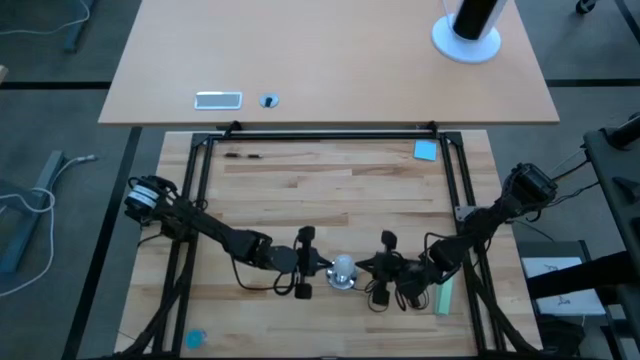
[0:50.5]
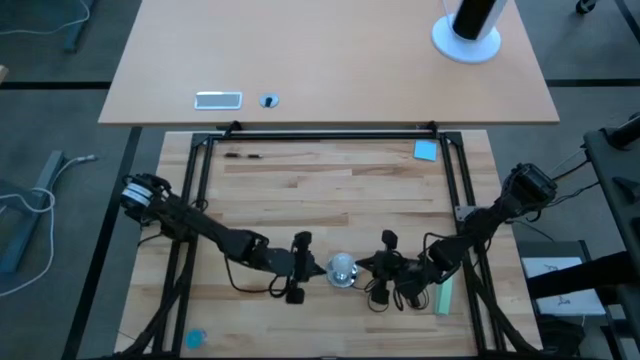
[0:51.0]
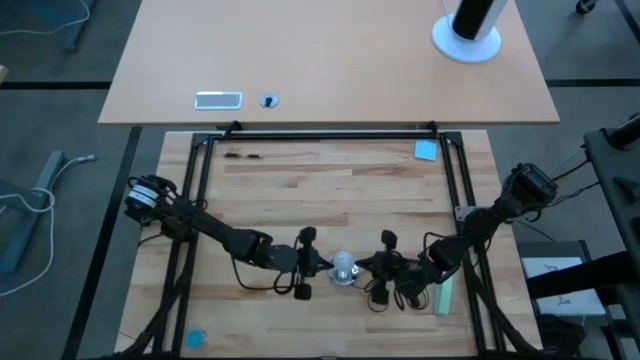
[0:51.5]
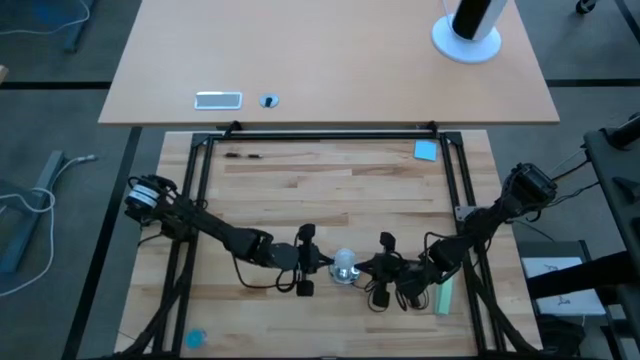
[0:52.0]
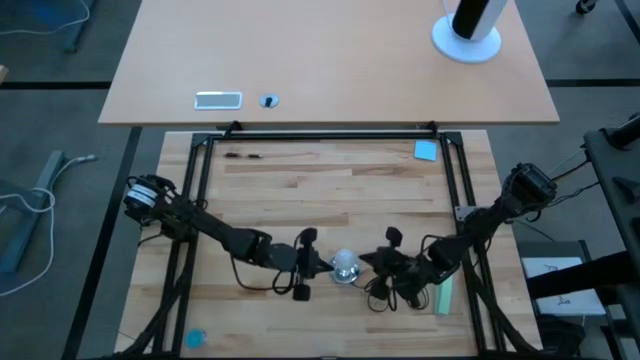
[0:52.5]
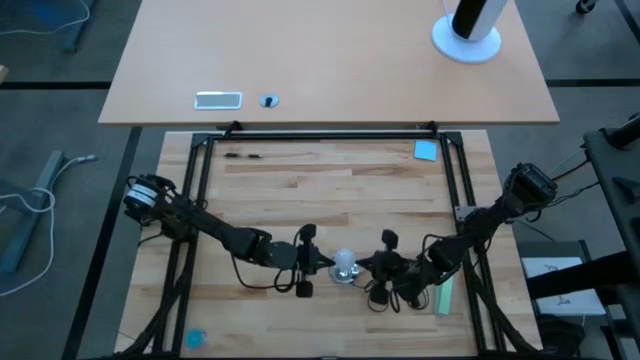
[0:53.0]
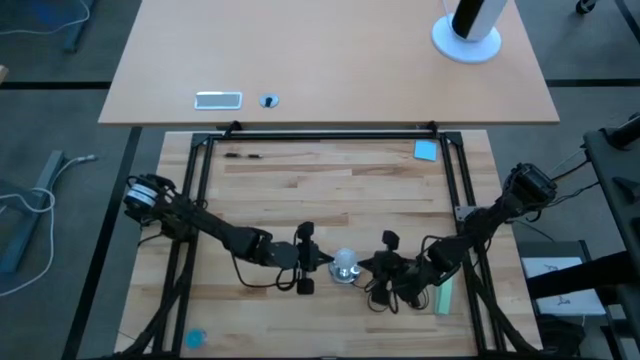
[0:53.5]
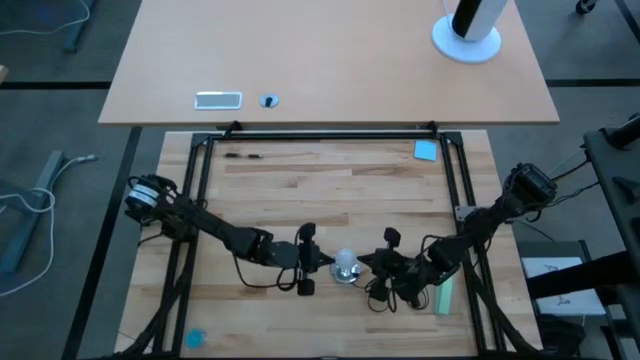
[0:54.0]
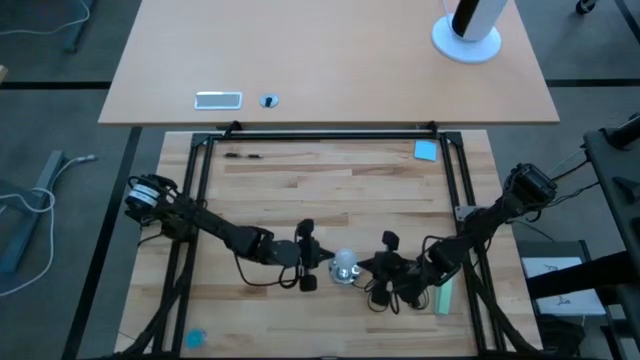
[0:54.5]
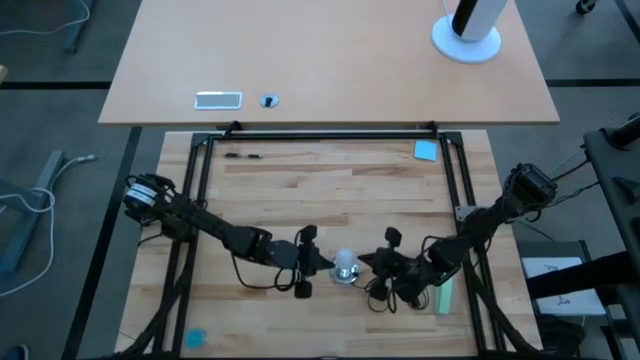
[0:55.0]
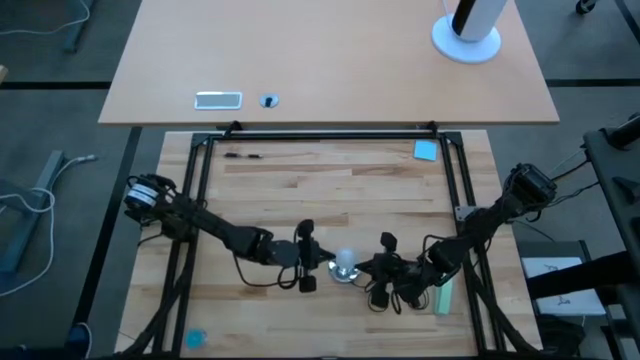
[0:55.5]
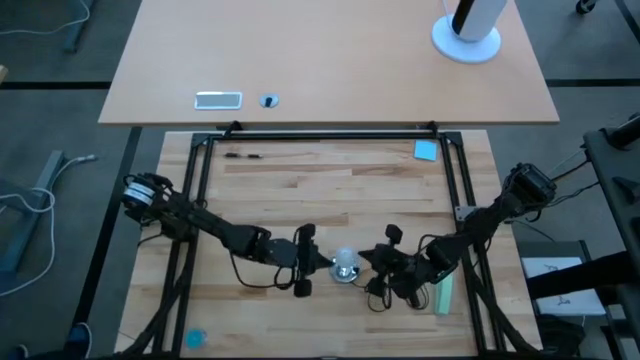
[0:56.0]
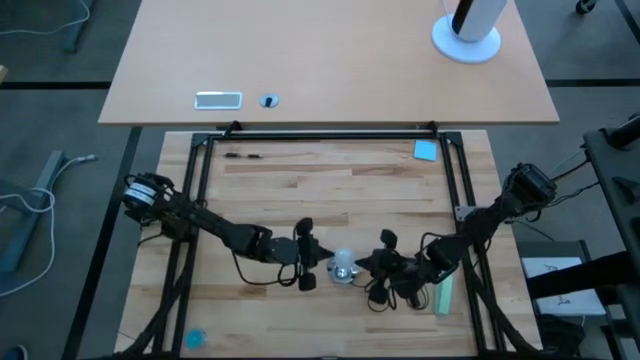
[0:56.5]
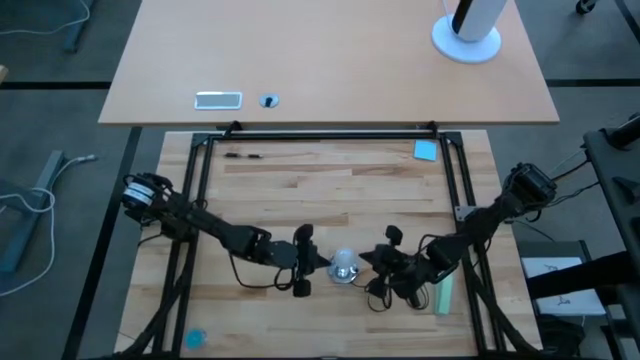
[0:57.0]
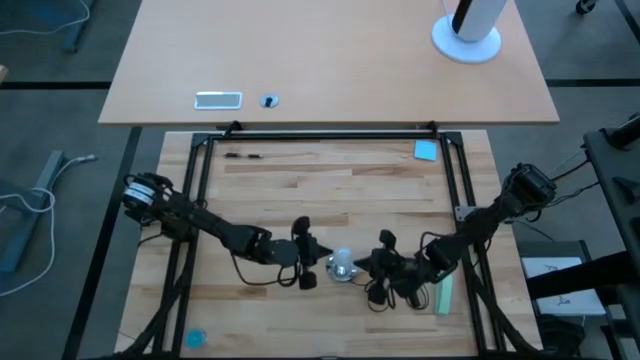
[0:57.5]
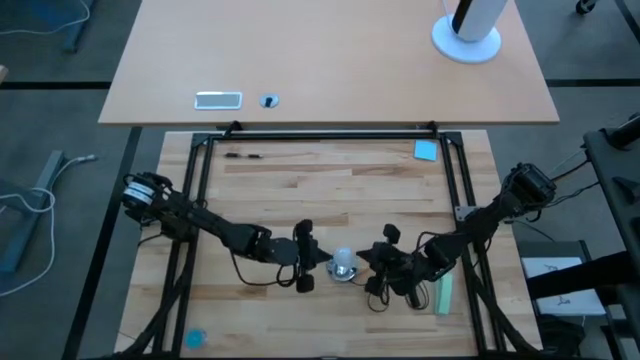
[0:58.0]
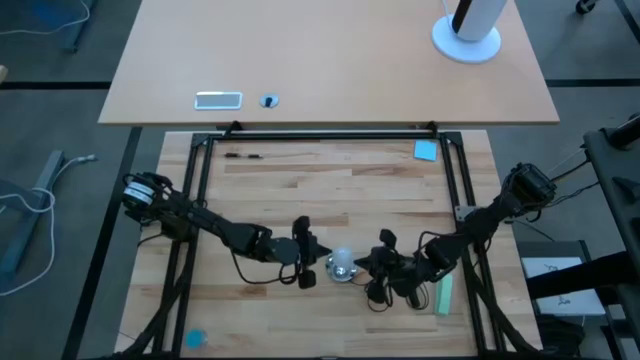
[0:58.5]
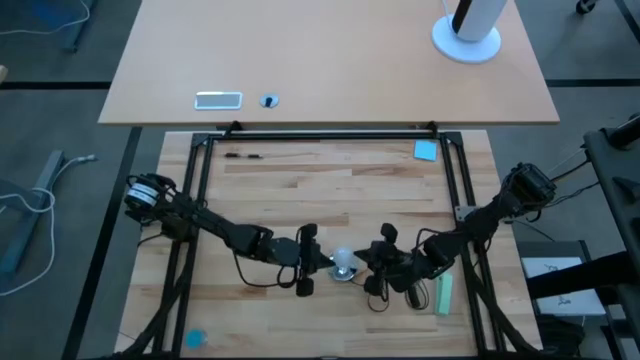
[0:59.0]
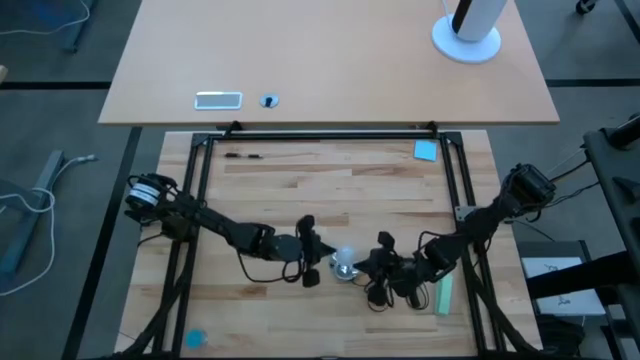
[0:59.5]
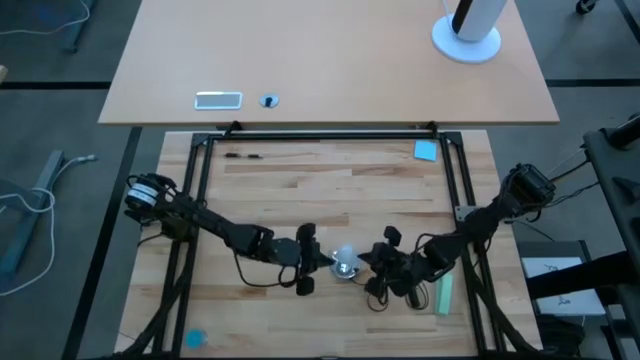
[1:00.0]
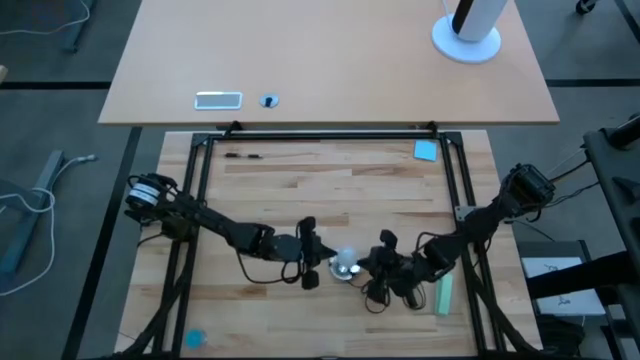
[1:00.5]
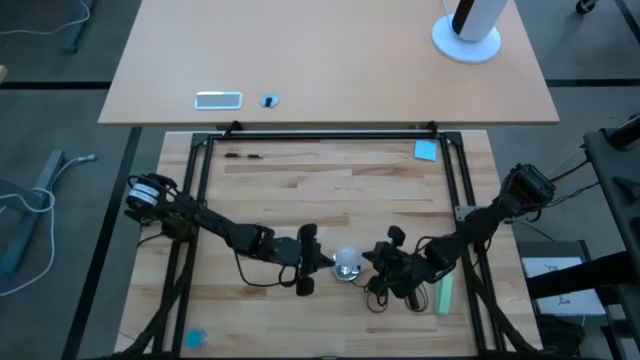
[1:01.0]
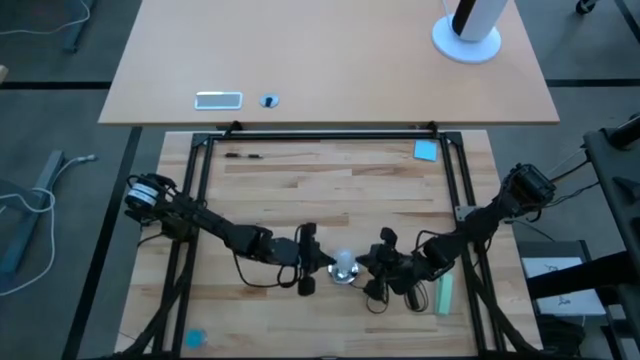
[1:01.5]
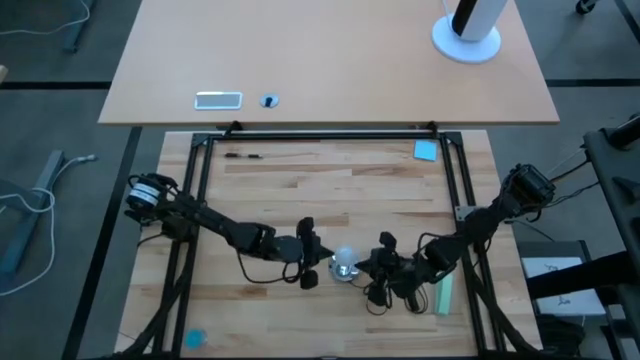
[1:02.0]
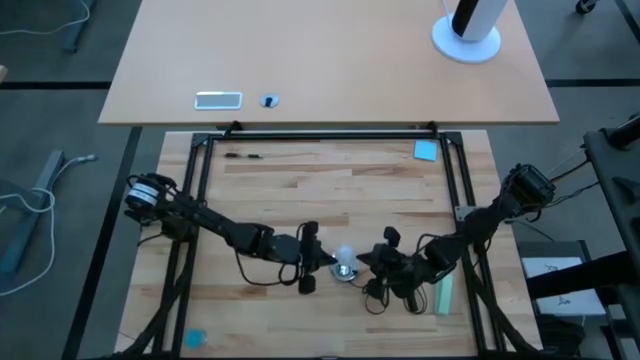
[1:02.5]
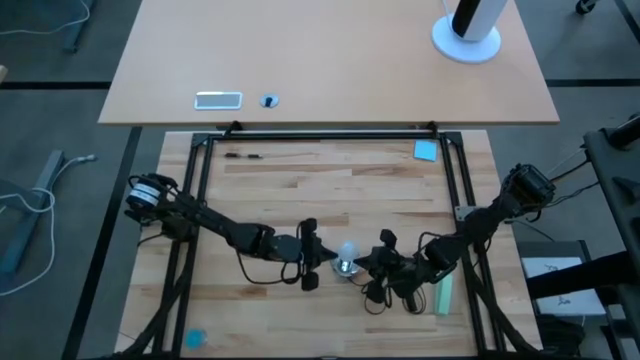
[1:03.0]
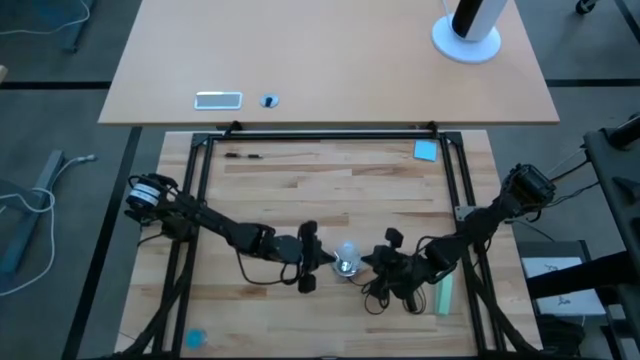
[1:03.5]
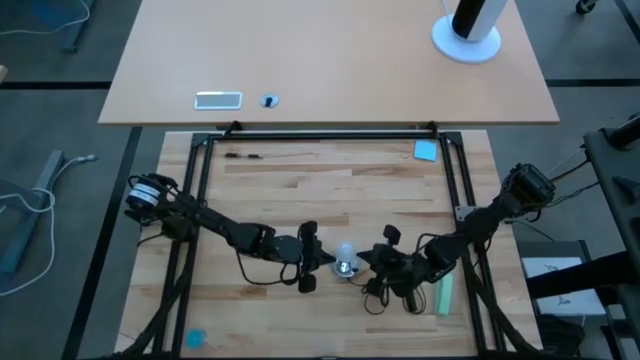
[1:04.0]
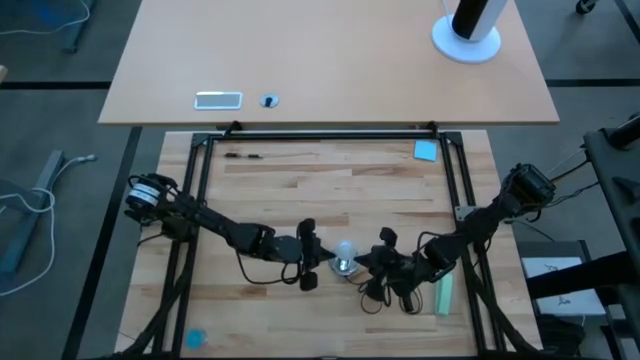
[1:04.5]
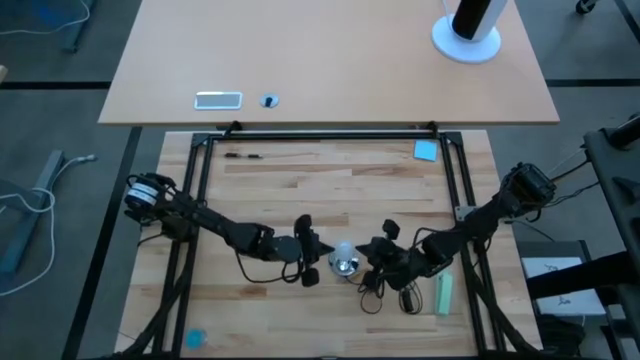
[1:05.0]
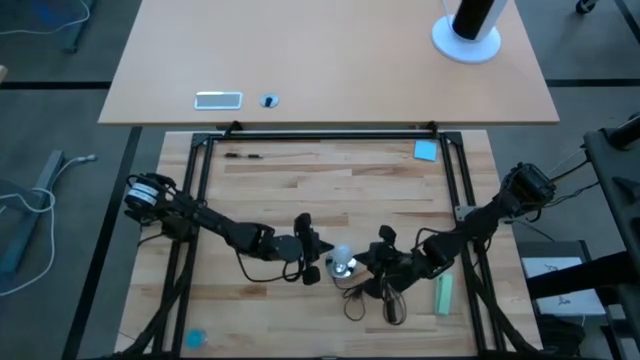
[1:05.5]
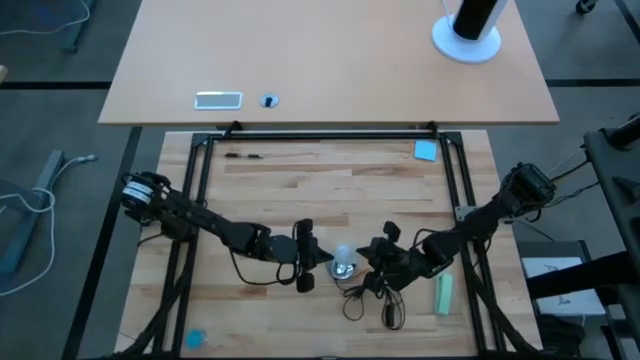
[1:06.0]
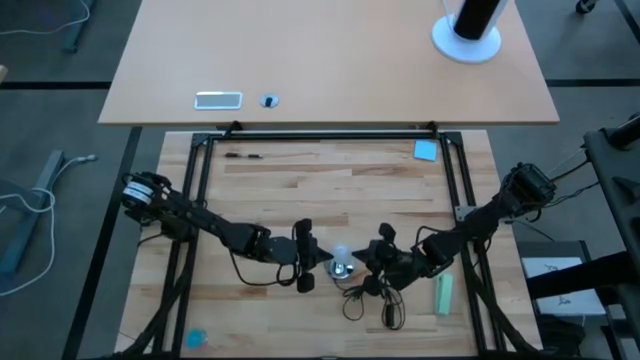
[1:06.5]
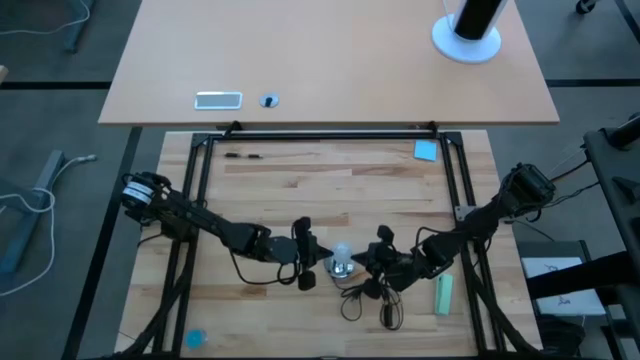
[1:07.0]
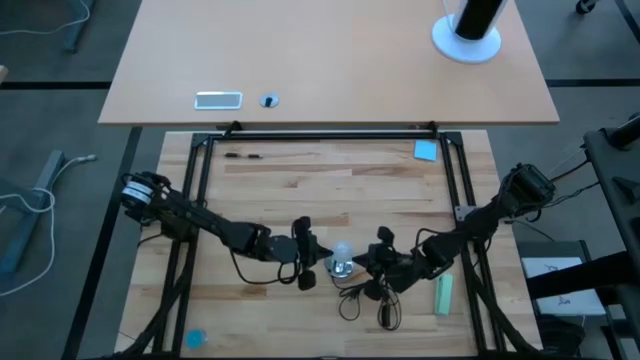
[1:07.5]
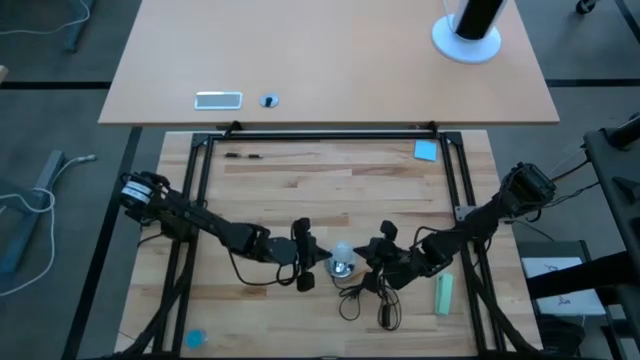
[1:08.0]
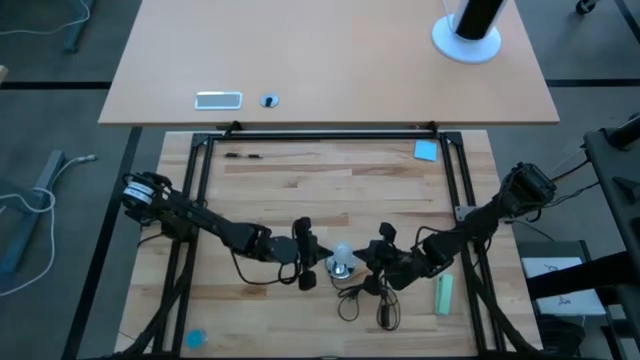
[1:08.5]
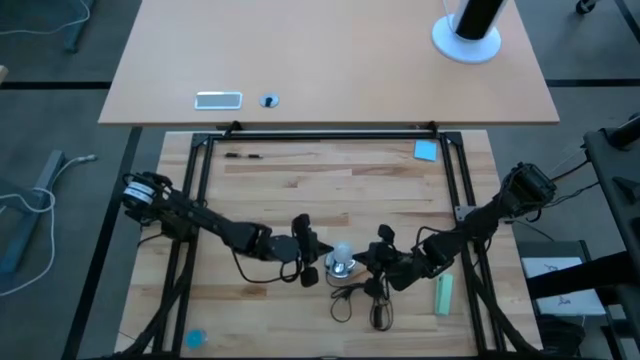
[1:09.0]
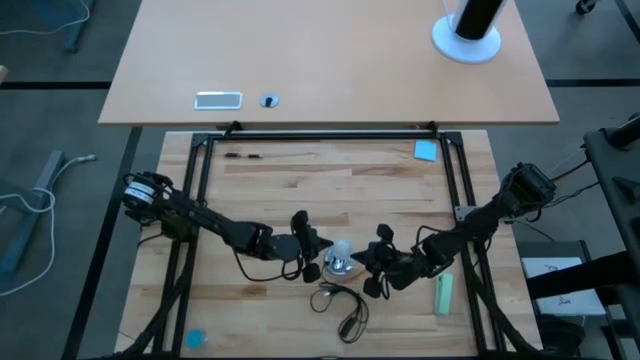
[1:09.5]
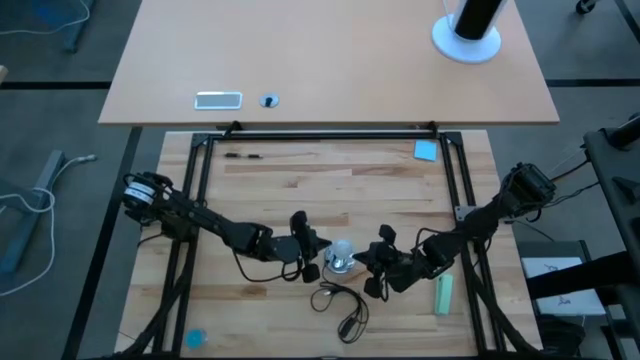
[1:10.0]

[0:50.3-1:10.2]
Task: Screw lightbulb
Insert the lightbulb into the lamp

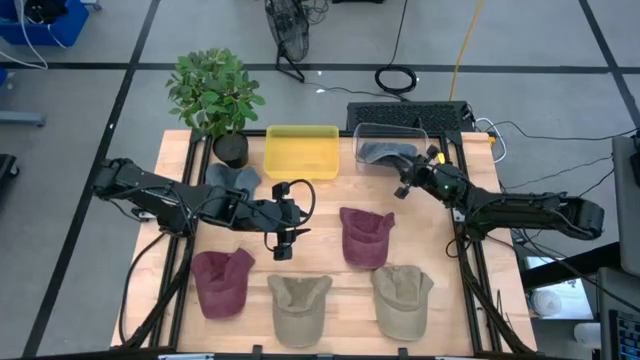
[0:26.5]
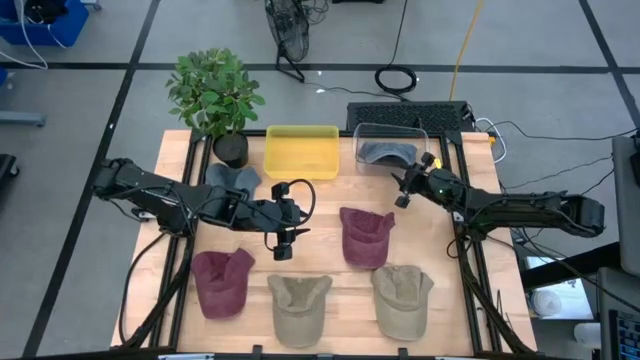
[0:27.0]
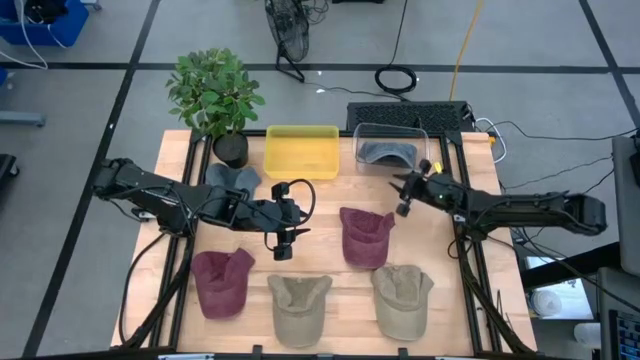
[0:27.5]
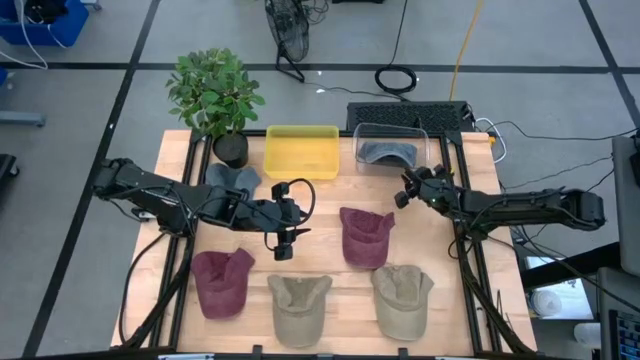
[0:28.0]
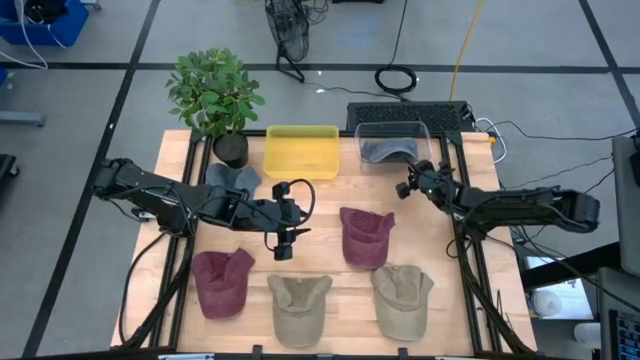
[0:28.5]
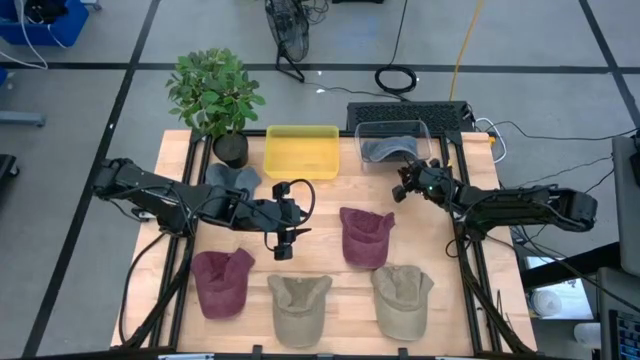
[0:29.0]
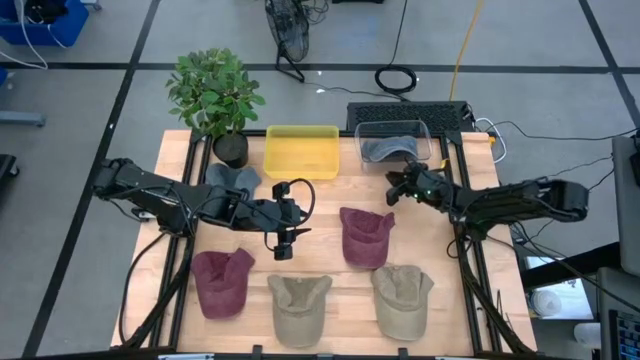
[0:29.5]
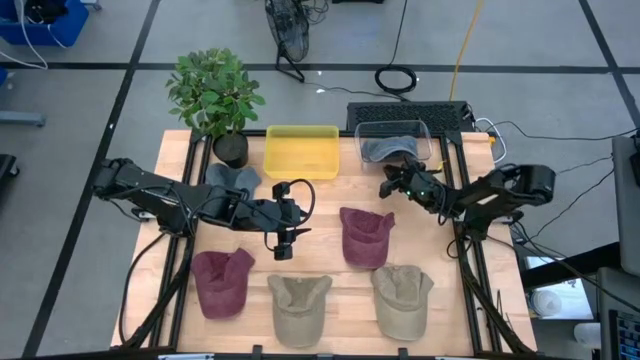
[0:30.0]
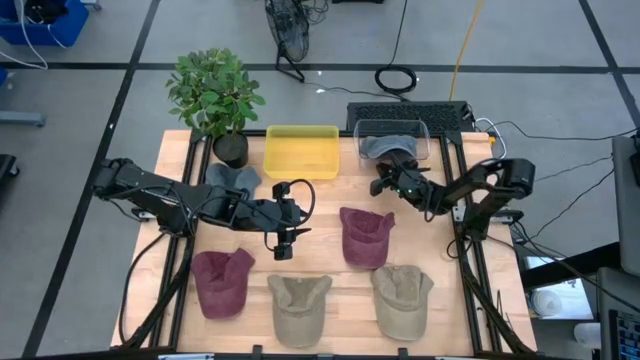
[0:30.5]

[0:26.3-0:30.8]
Task: Pick & Place hat
Adjust the transparent bin on the table
